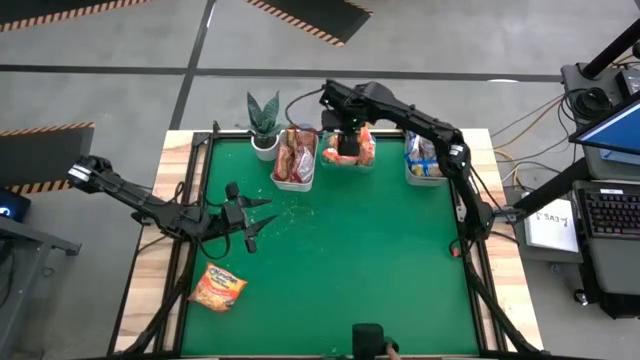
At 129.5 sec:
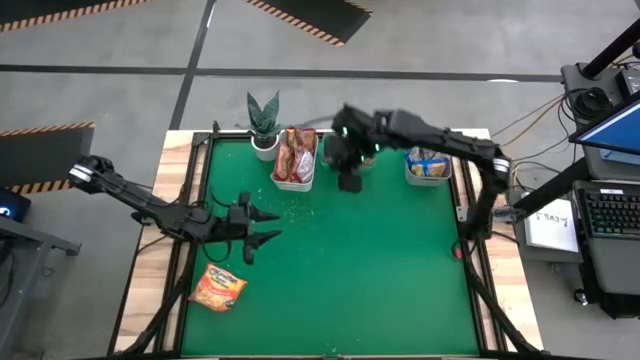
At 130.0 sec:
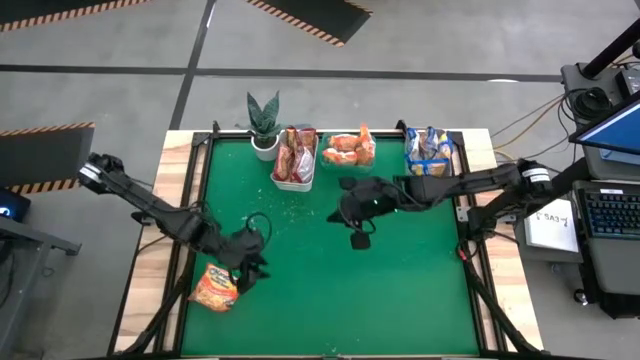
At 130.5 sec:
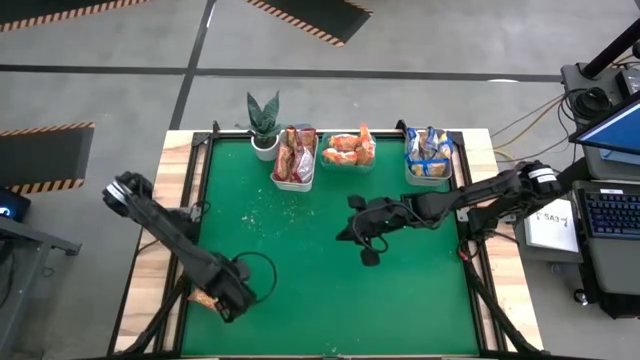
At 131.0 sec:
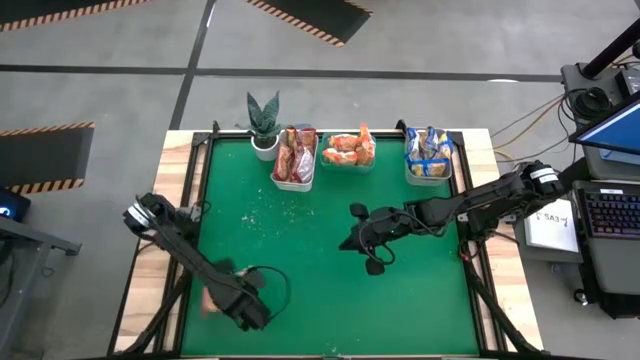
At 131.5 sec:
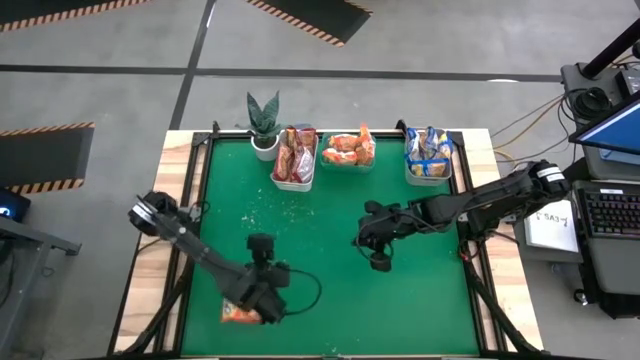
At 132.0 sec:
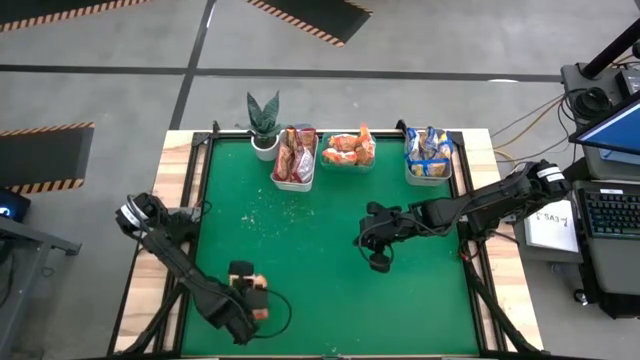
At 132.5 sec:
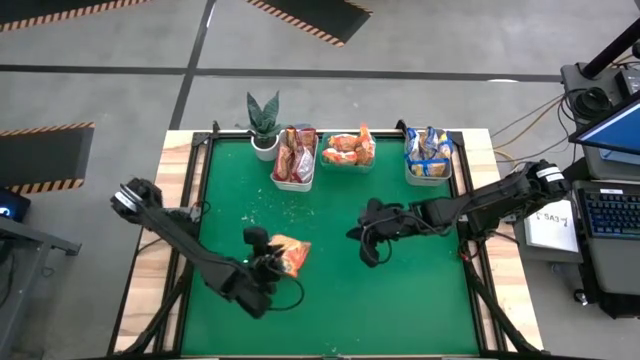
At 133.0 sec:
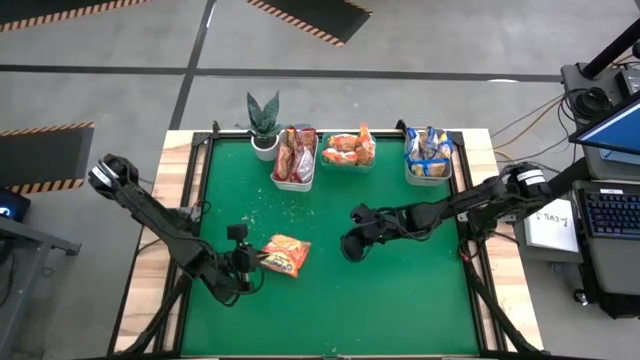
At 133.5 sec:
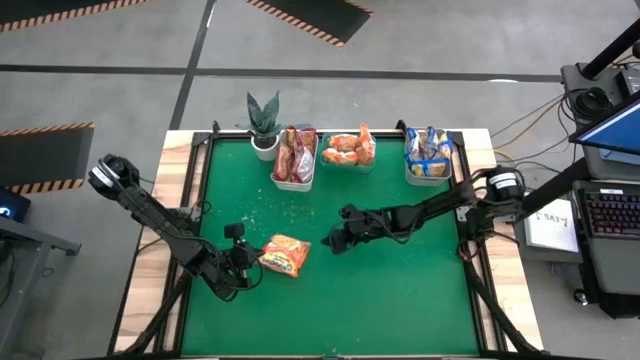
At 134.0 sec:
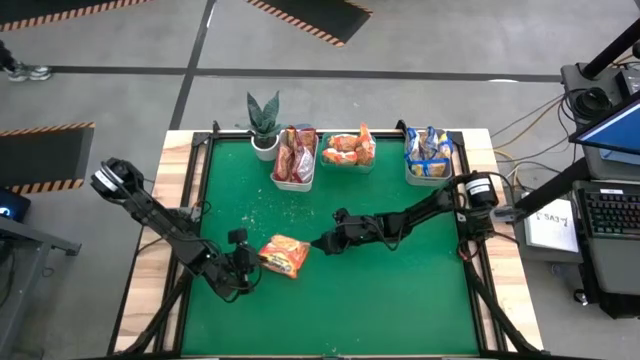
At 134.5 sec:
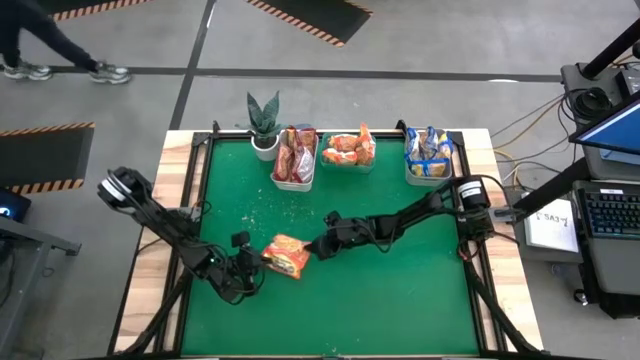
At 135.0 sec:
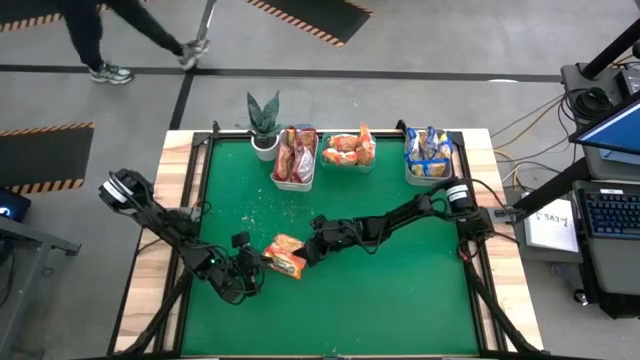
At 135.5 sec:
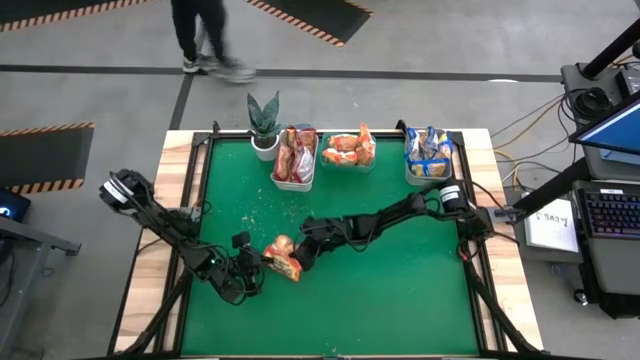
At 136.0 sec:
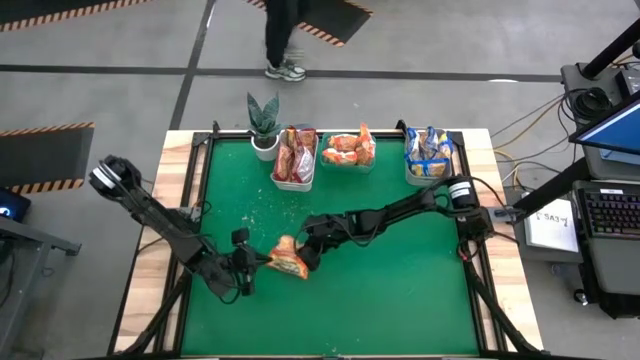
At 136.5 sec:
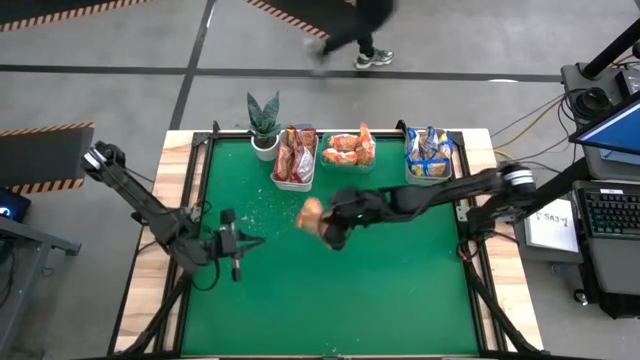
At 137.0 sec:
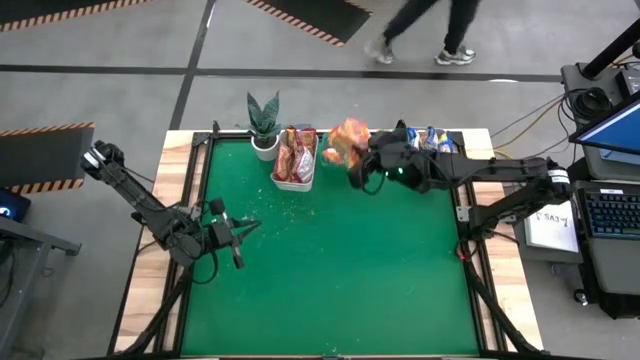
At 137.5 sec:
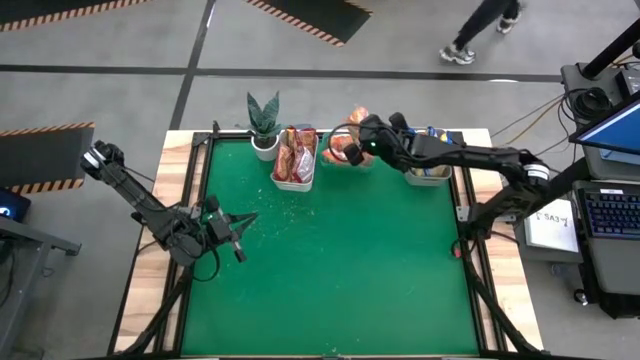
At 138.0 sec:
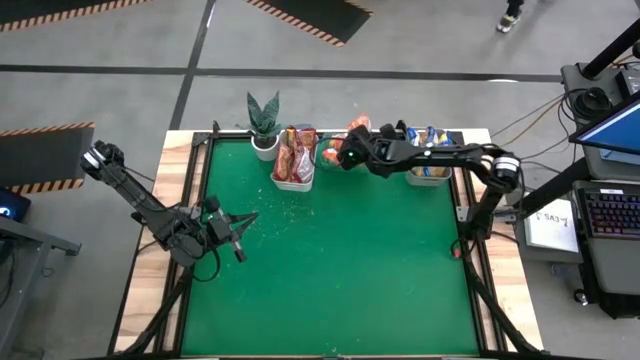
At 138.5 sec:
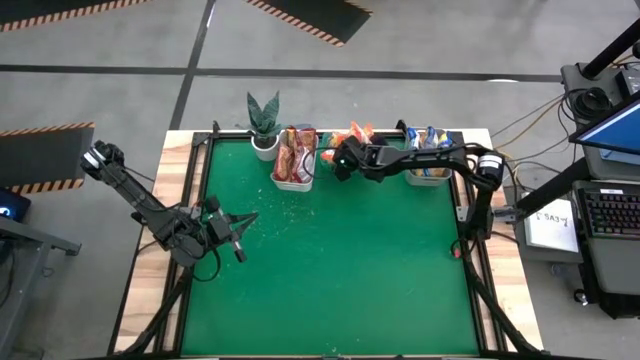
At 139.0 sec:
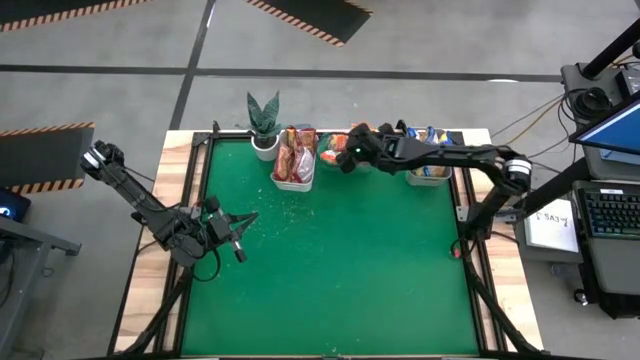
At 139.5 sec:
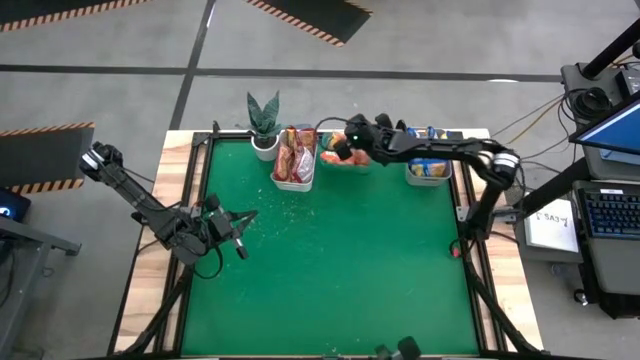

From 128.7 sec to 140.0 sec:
Task: Sort Maruchan noodles
Put the orange noodle pack into the green bin

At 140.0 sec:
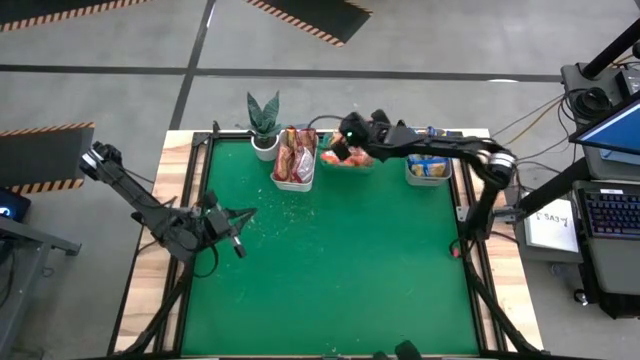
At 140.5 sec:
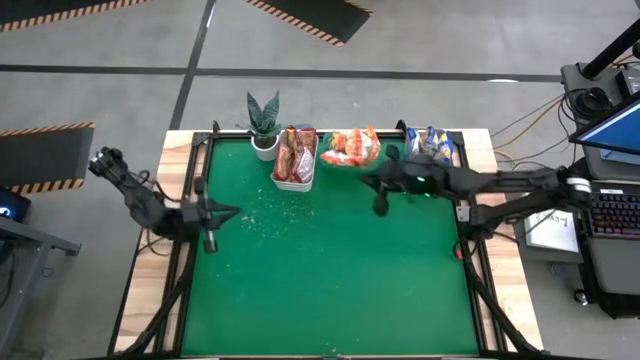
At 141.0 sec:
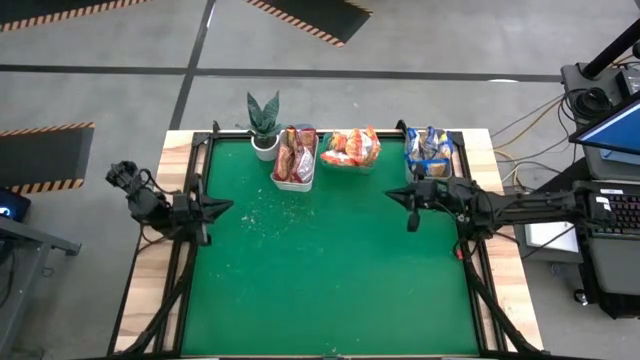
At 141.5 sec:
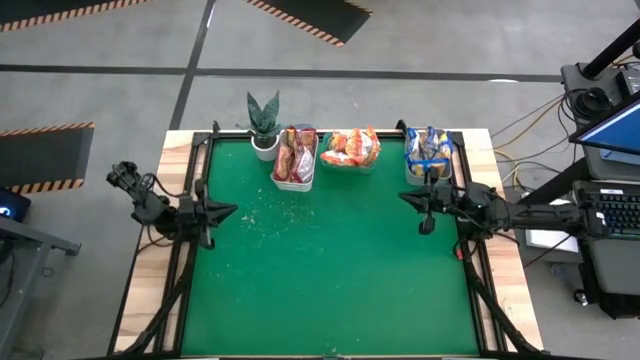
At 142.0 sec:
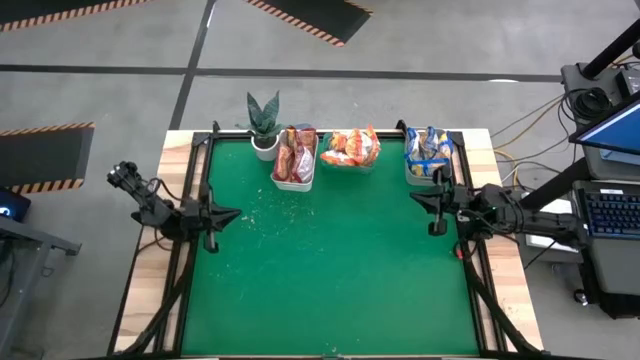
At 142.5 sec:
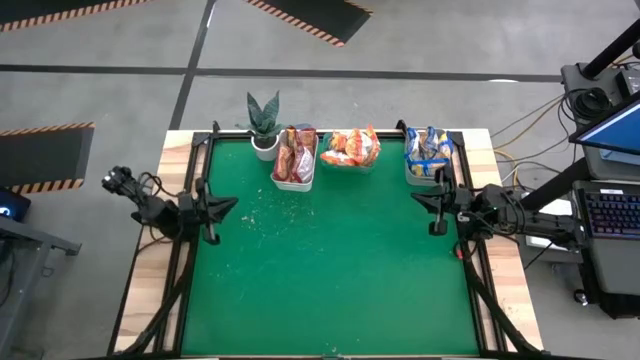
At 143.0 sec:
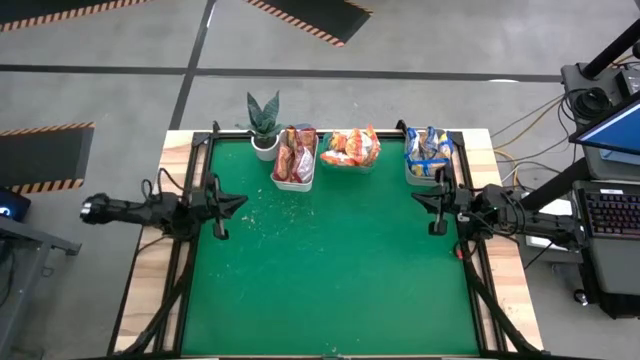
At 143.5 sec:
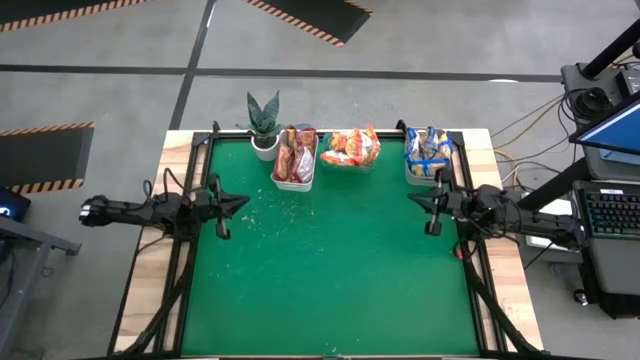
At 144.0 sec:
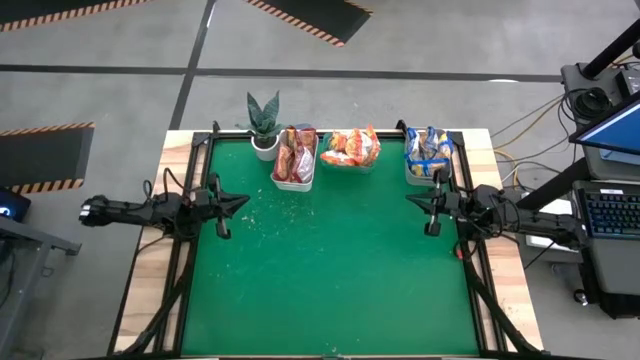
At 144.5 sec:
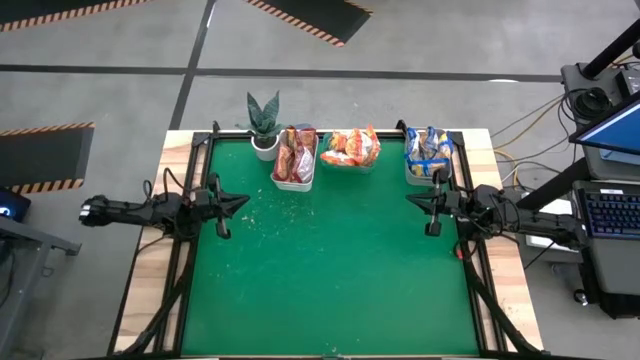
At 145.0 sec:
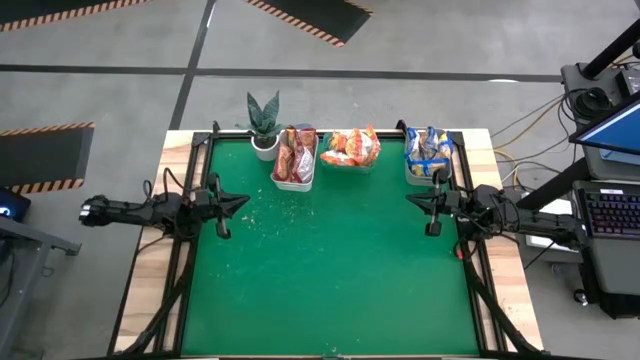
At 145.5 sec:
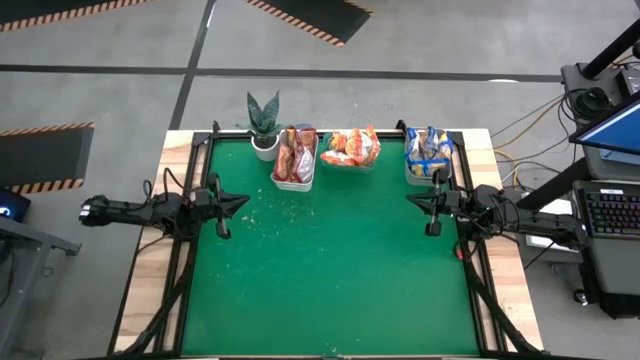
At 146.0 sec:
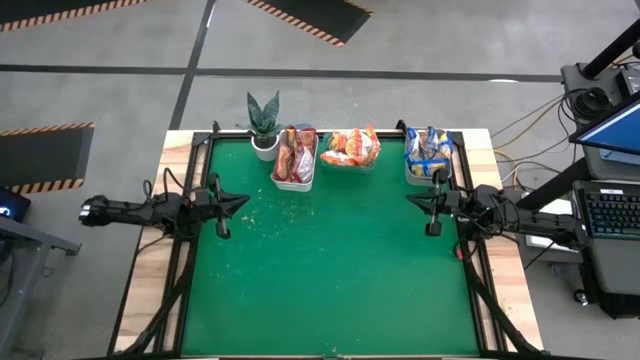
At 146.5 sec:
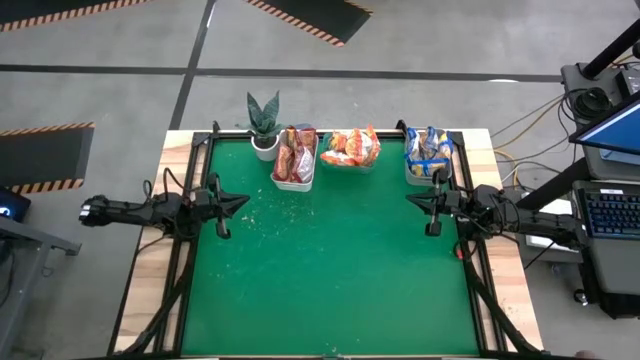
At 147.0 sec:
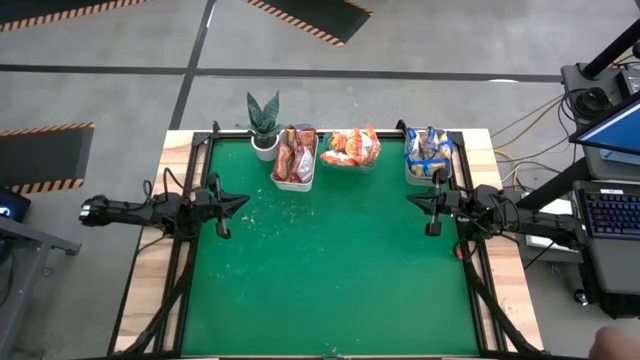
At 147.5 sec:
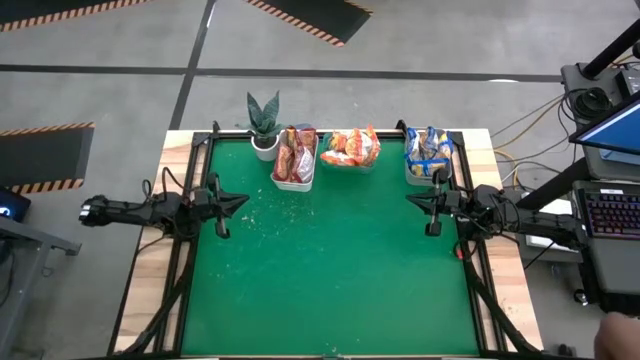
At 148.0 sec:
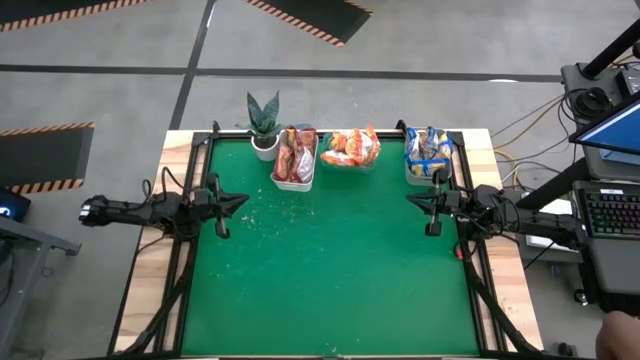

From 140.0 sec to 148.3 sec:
Return to Home Position
